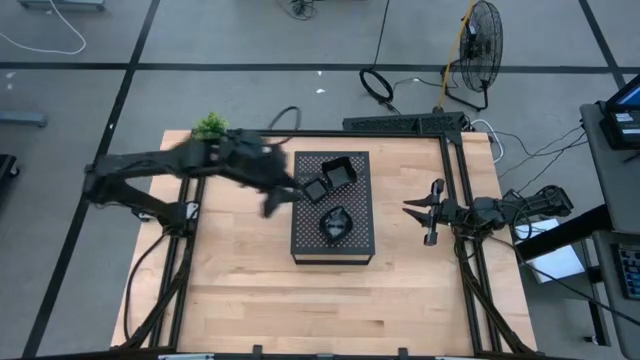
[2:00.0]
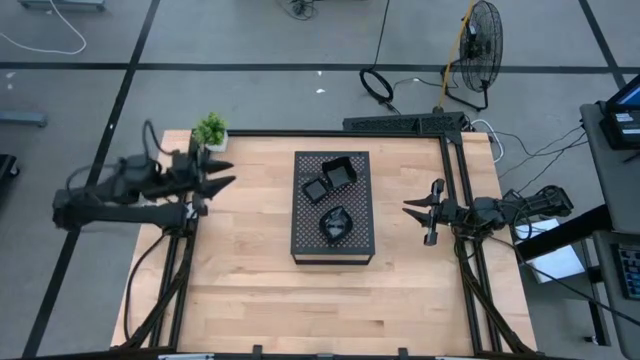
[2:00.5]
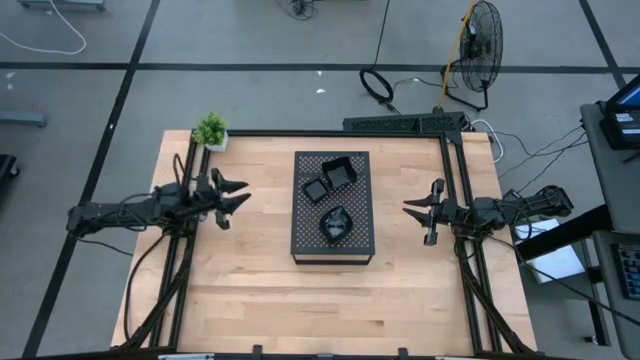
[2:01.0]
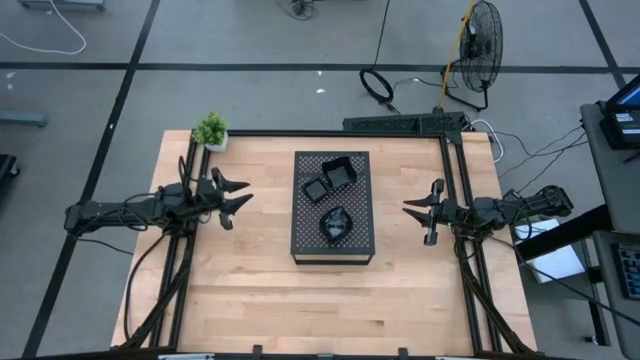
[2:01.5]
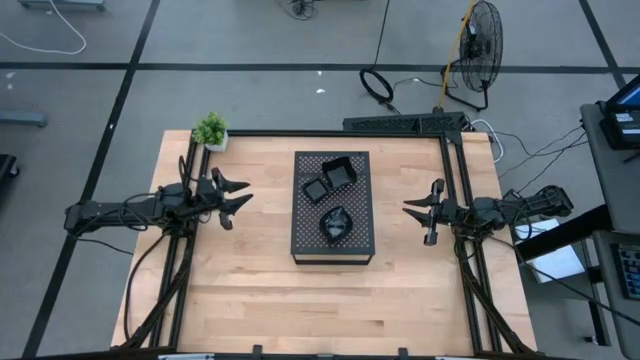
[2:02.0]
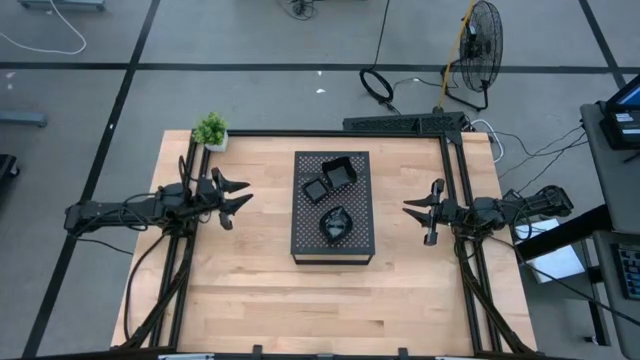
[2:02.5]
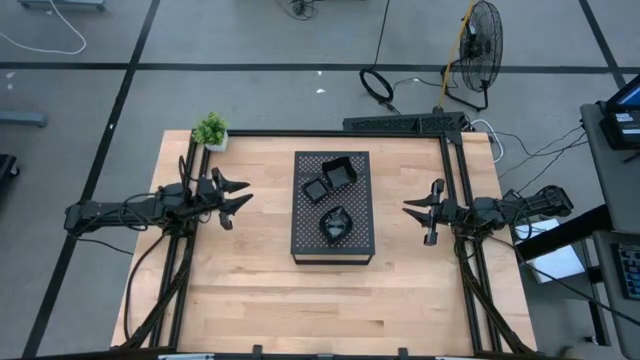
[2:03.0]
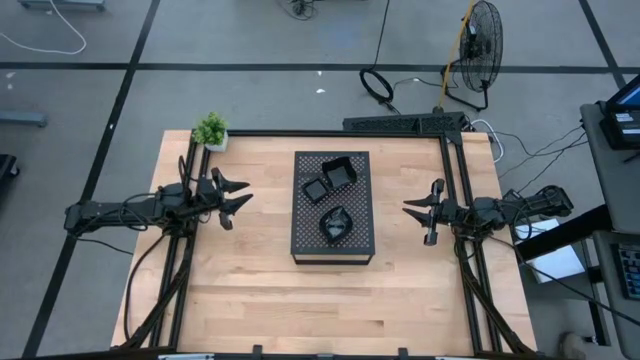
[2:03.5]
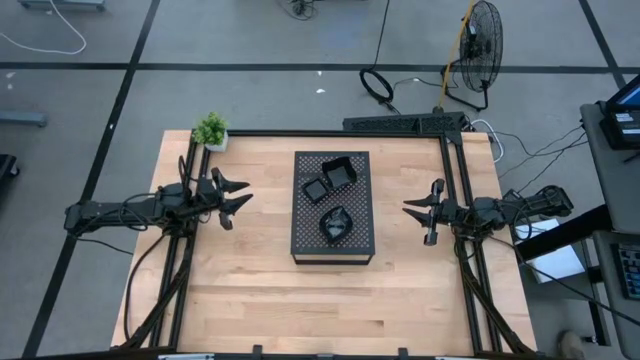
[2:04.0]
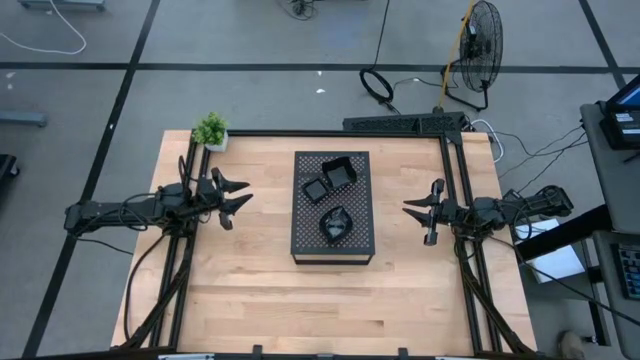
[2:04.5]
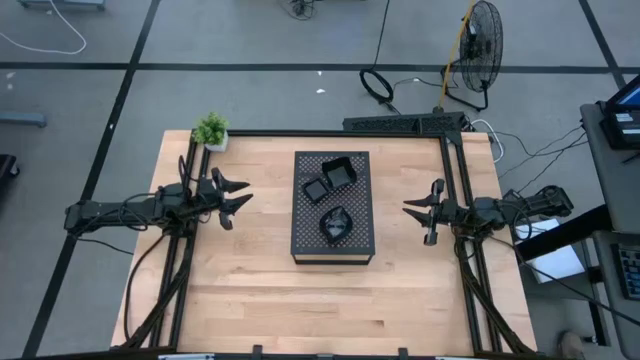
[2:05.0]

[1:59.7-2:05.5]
Task: Pick & Place Mini shaped plates
Return to Home Position

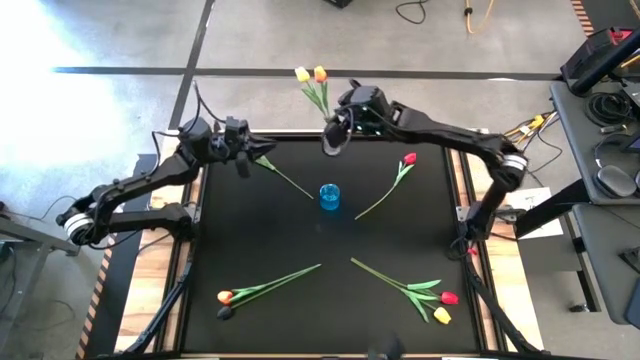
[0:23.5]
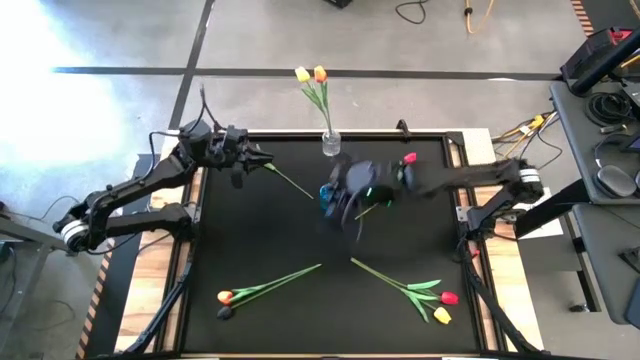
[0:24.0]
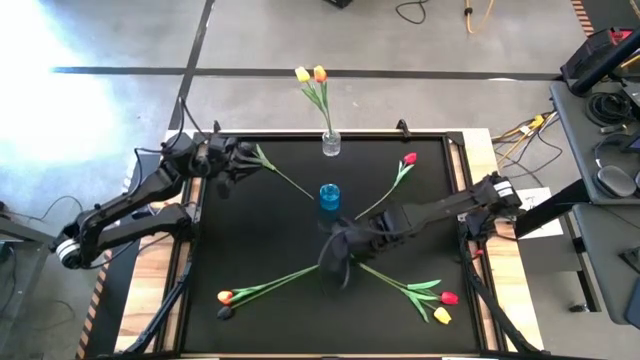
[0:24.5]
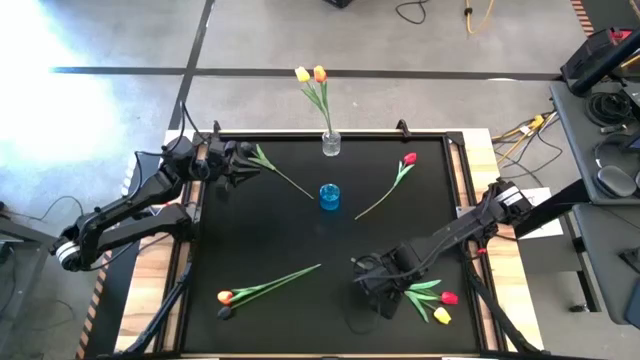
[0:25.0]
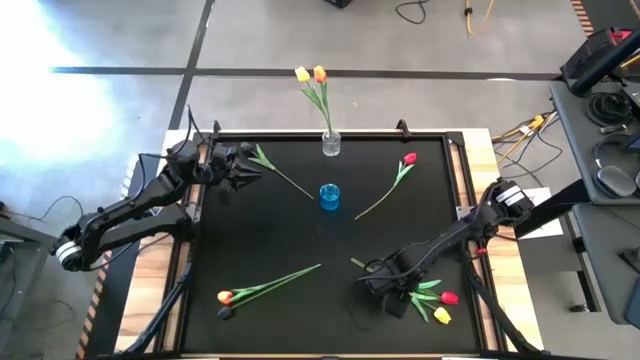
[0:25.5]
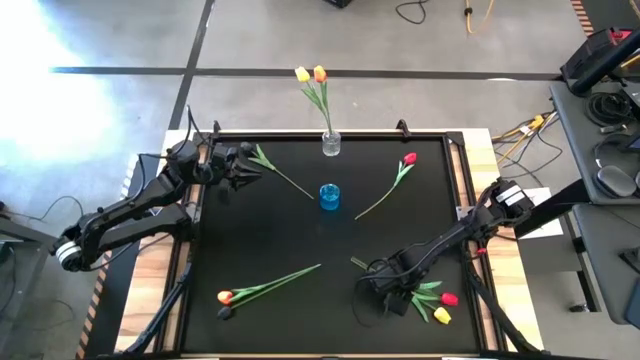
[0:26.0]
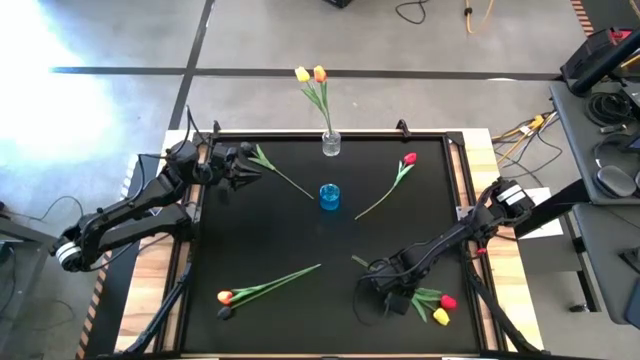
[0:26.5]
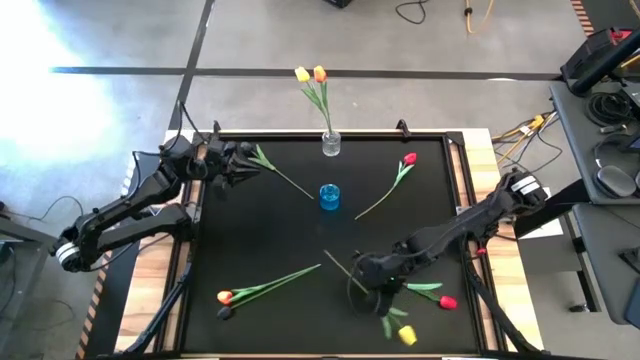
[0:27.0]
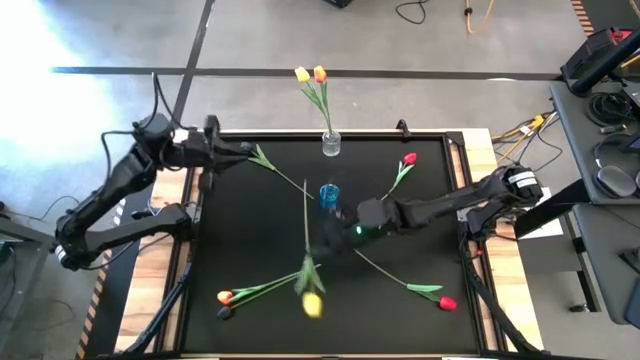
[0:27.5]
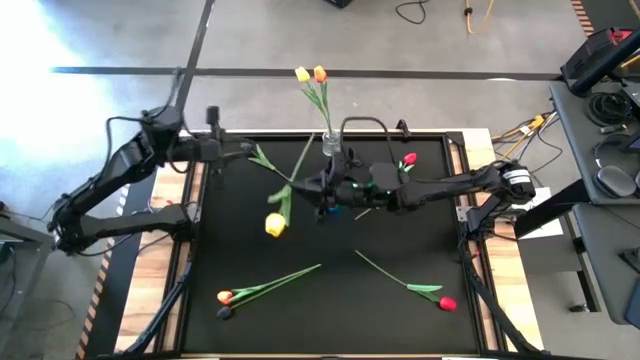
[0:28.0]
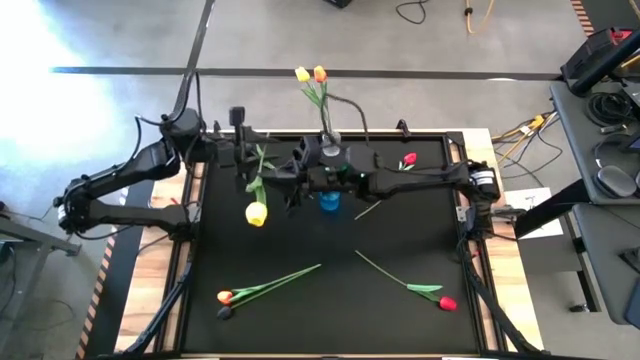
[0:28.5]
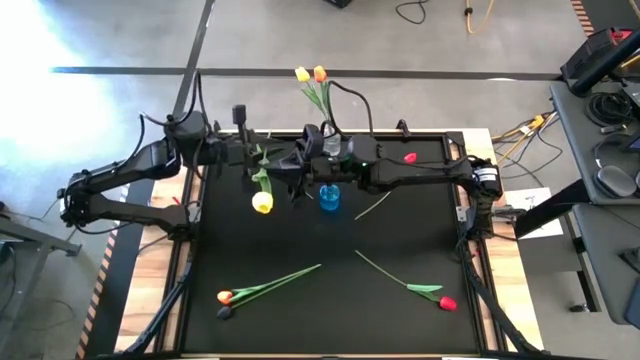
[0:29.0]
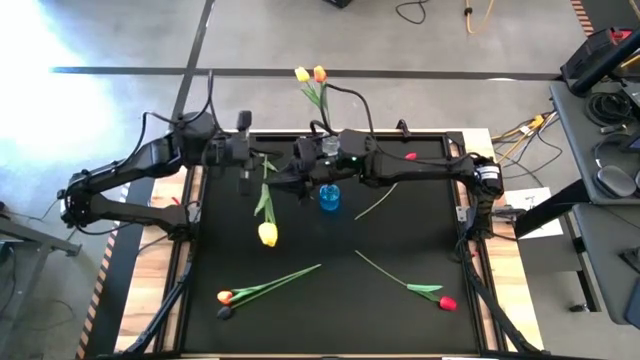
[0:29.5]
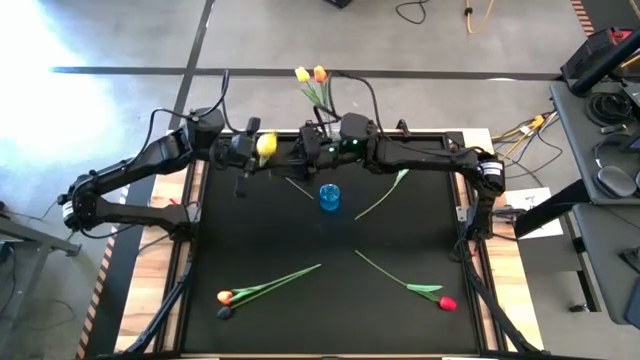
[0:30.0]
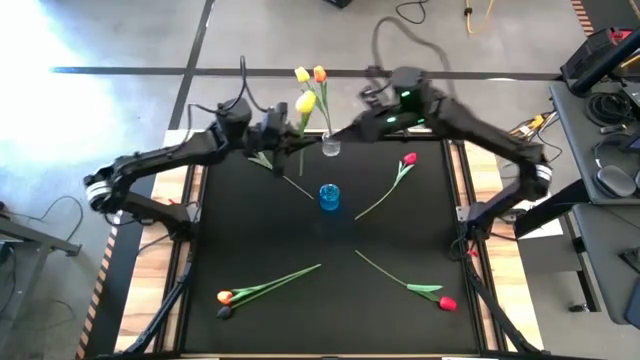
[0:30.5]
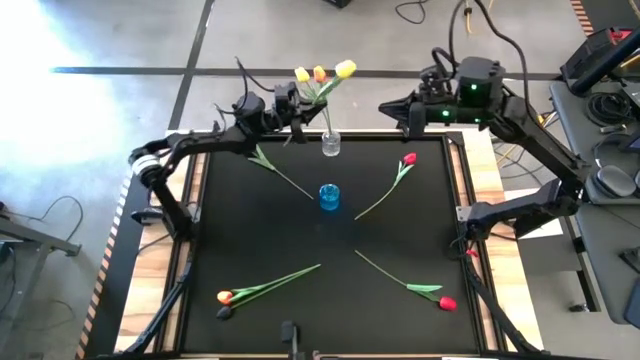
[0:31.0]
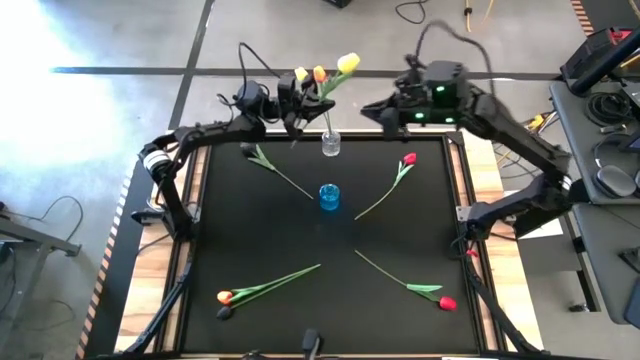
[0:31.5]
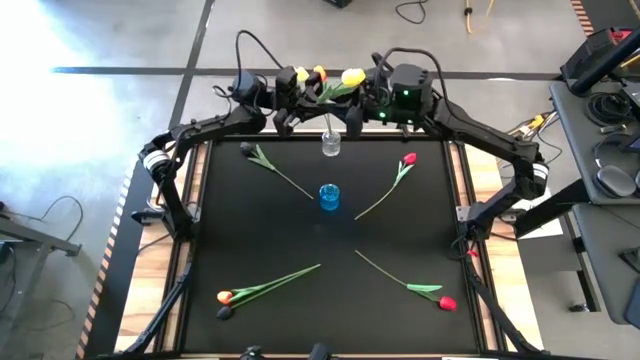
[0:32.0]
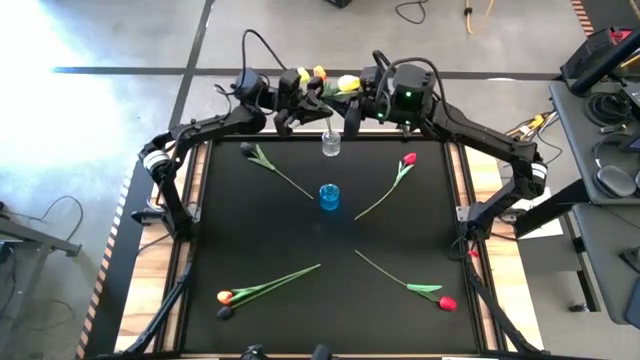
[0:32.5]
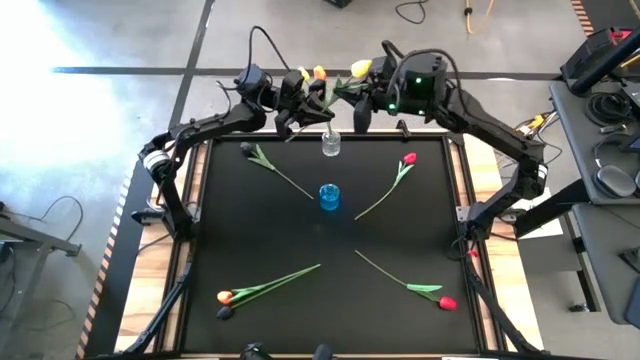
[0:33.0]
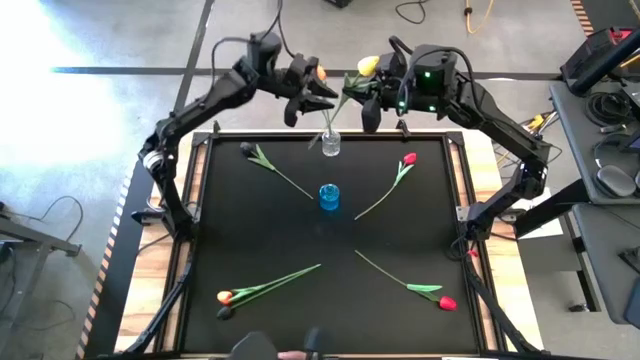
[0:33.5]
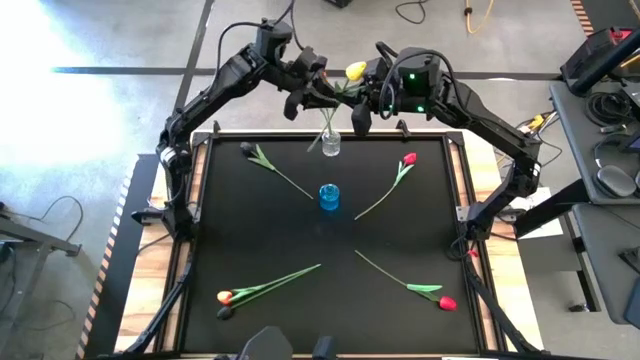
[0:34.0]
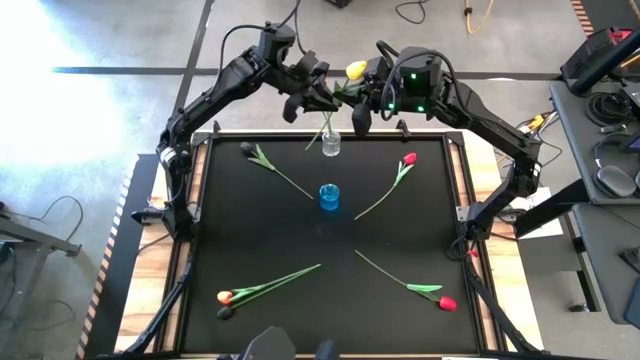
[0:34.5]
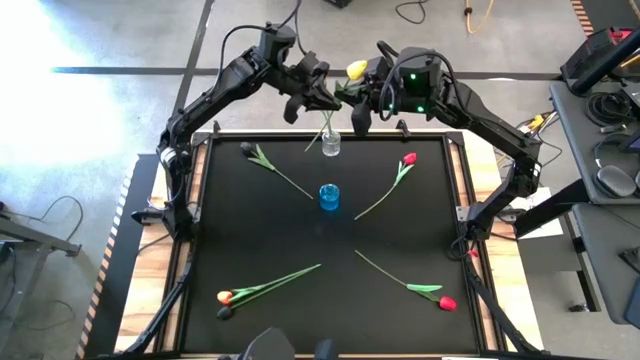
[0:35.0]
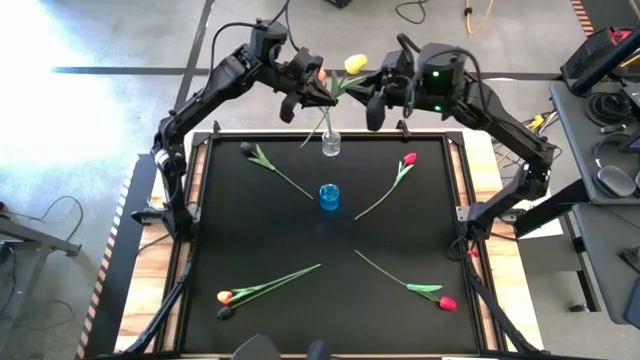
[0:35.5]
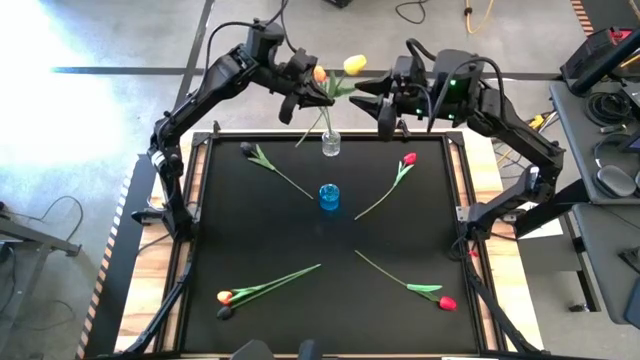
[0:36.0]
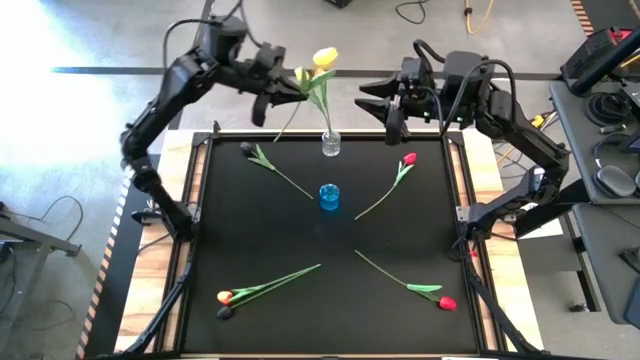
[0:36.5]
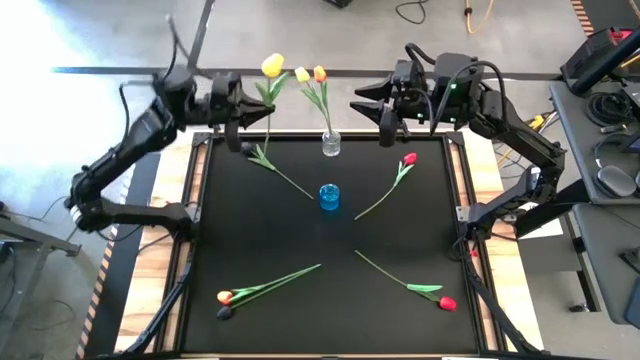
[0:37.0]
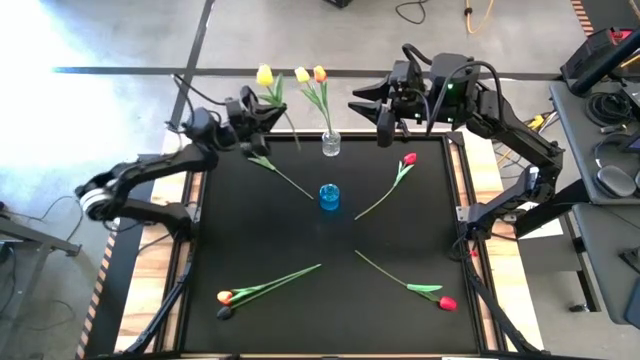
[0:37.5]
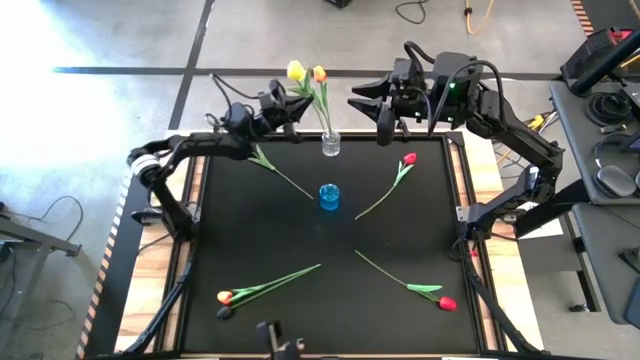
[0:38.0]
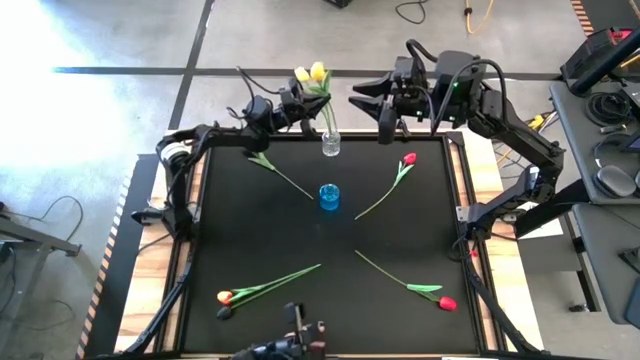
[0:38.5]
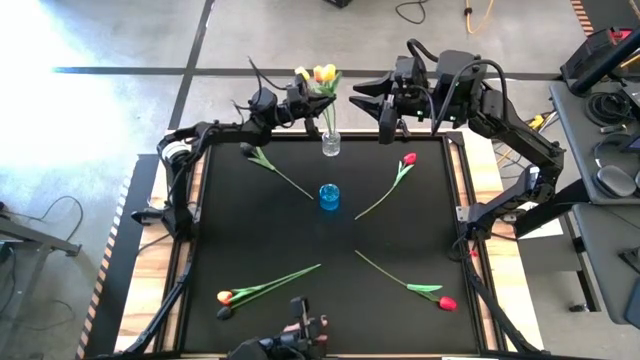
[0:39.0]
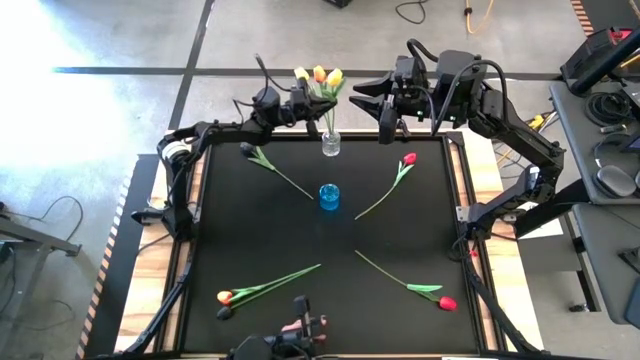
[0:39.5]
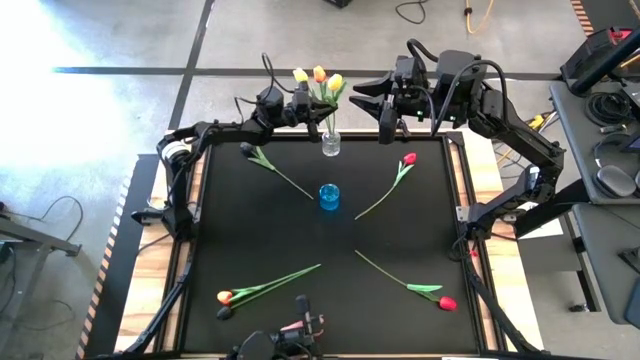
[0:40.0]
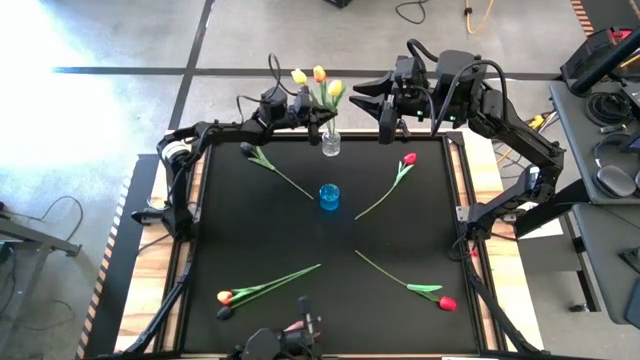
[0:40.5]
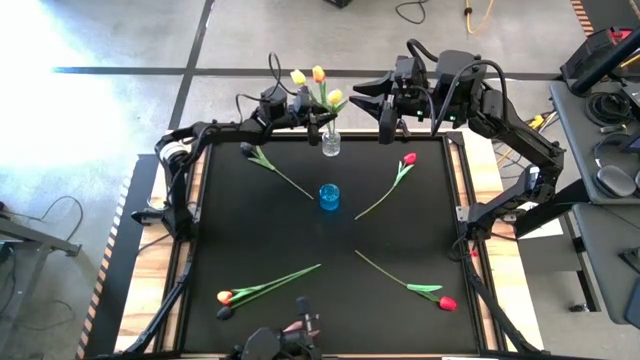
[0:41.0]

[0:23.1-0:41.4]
Task: Sort flowers into vase by color
Put the yellow tulip flower into the transparent vase
